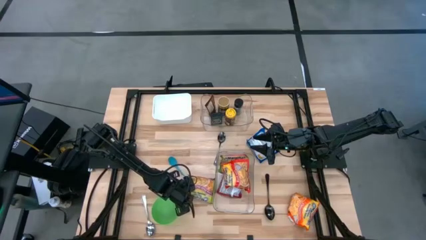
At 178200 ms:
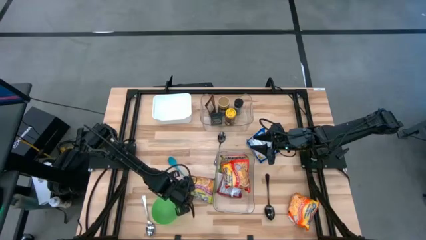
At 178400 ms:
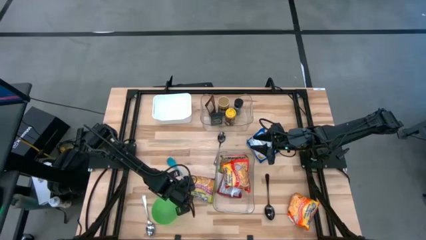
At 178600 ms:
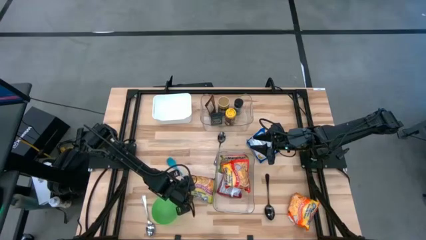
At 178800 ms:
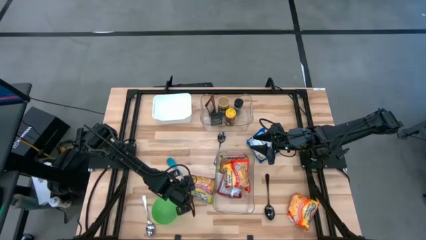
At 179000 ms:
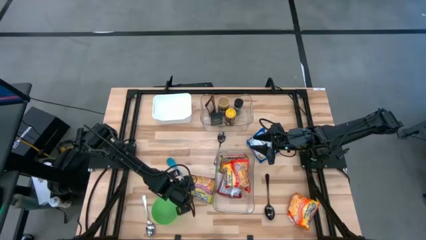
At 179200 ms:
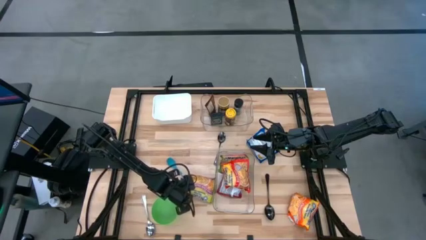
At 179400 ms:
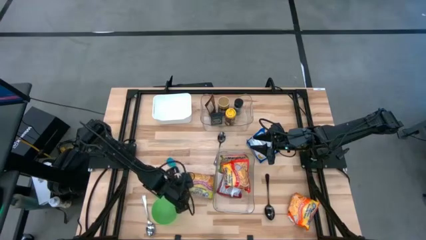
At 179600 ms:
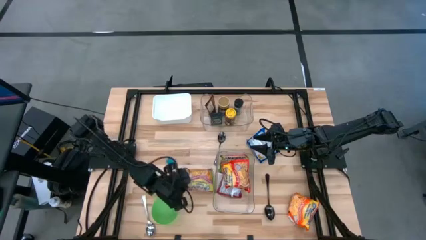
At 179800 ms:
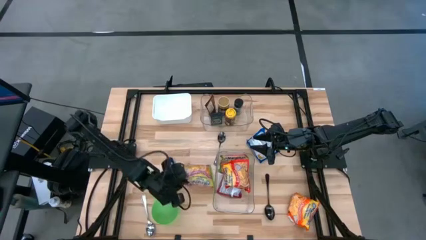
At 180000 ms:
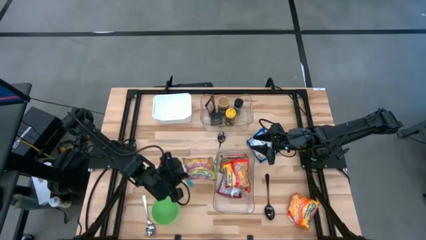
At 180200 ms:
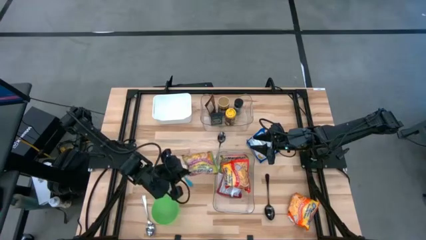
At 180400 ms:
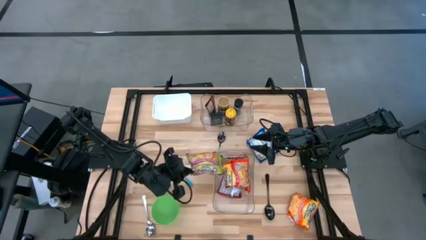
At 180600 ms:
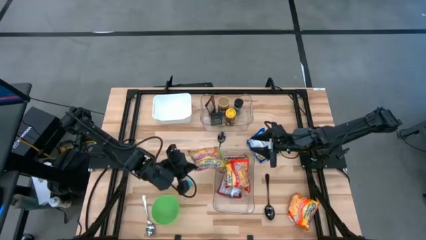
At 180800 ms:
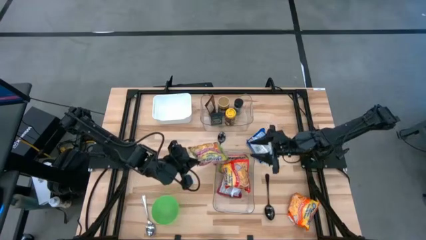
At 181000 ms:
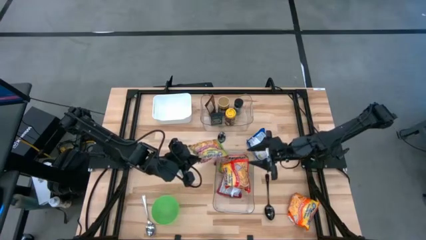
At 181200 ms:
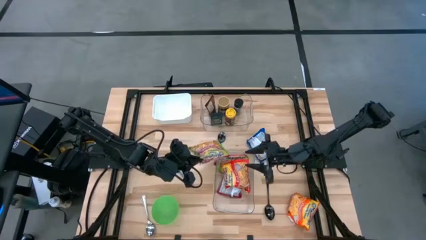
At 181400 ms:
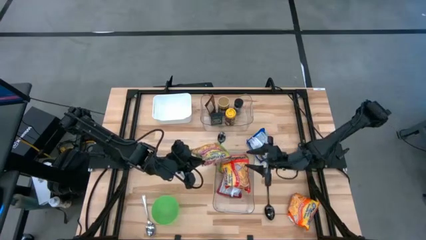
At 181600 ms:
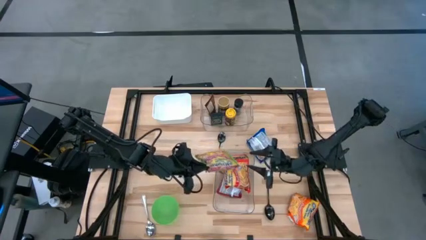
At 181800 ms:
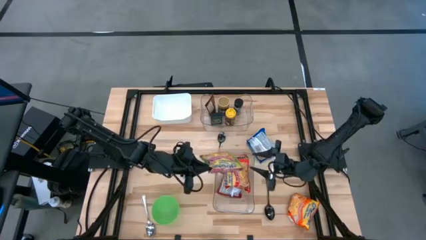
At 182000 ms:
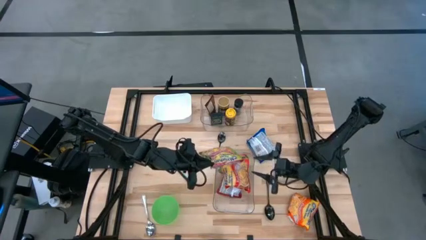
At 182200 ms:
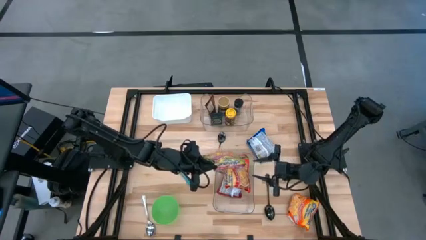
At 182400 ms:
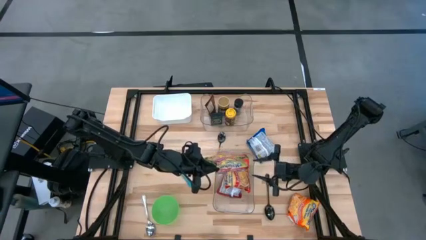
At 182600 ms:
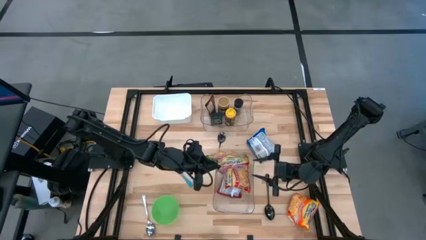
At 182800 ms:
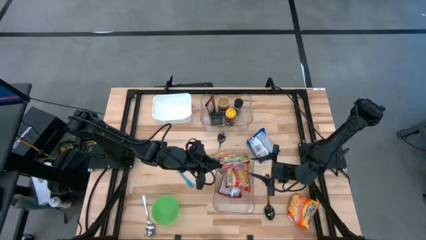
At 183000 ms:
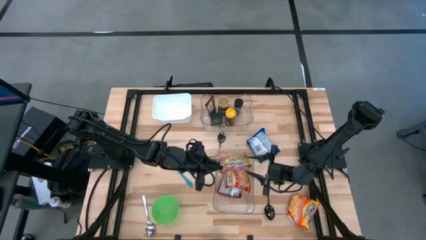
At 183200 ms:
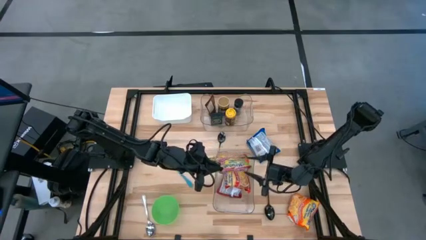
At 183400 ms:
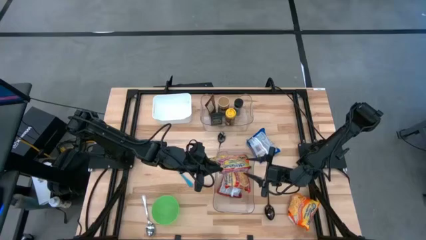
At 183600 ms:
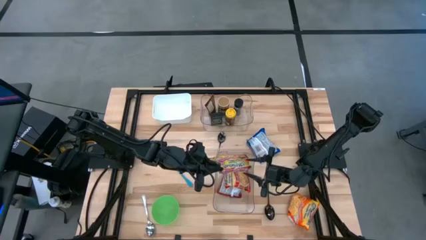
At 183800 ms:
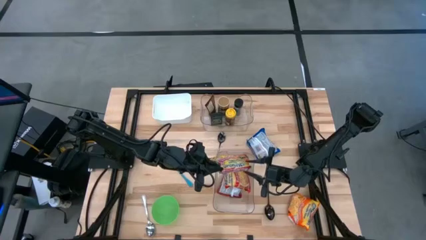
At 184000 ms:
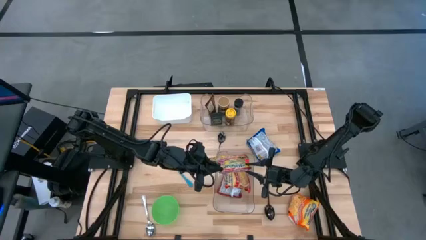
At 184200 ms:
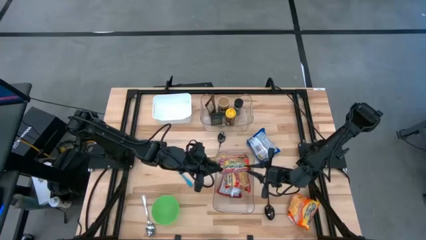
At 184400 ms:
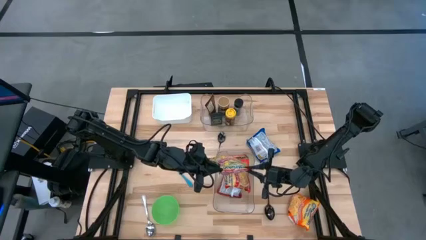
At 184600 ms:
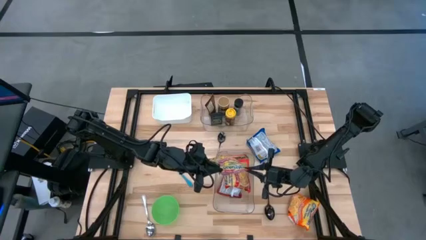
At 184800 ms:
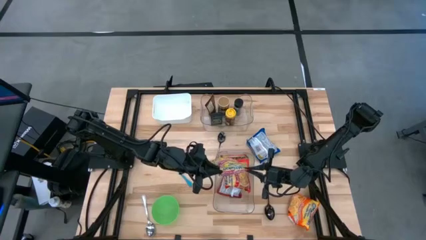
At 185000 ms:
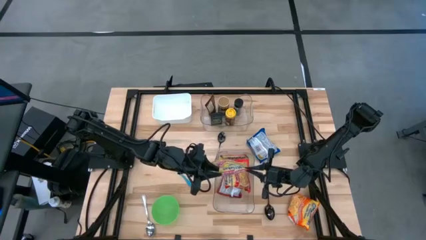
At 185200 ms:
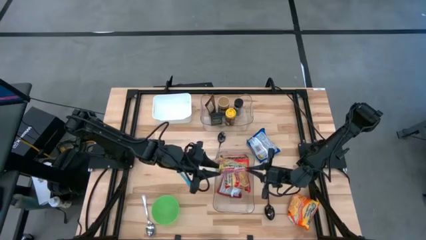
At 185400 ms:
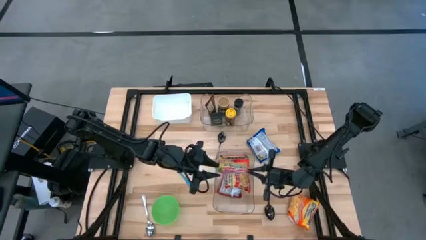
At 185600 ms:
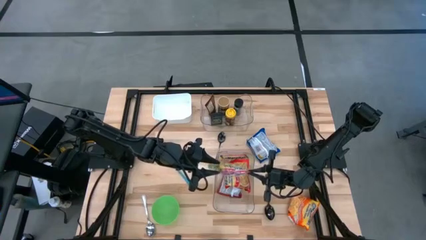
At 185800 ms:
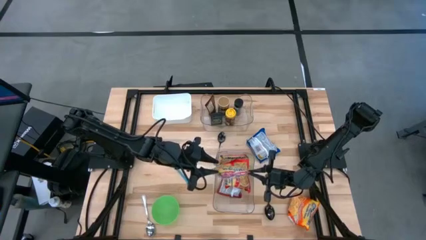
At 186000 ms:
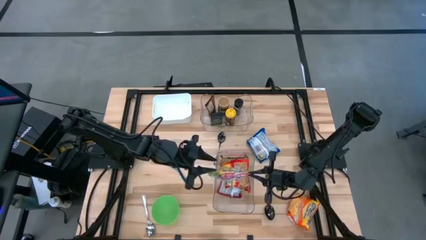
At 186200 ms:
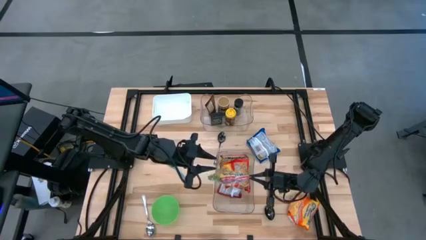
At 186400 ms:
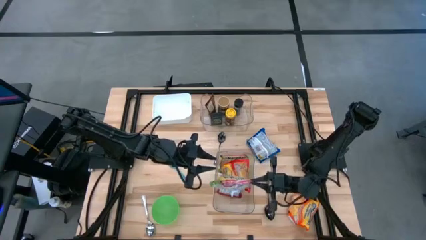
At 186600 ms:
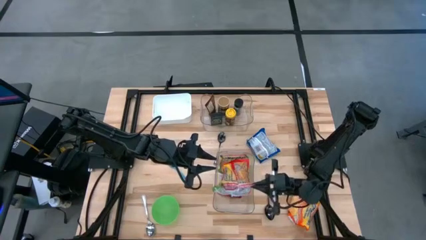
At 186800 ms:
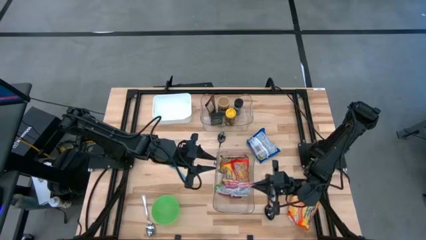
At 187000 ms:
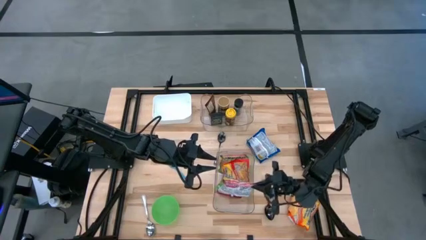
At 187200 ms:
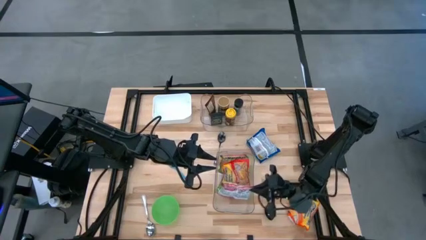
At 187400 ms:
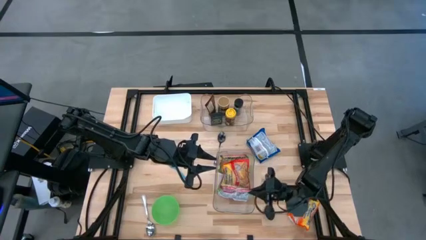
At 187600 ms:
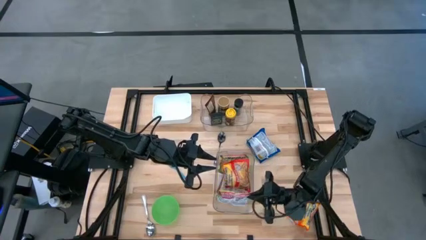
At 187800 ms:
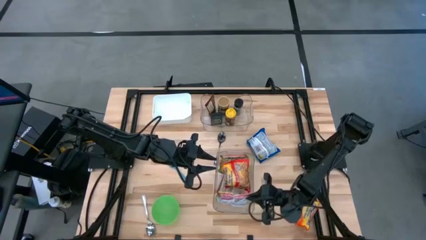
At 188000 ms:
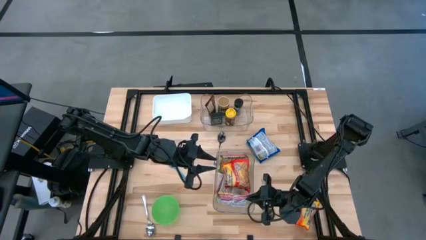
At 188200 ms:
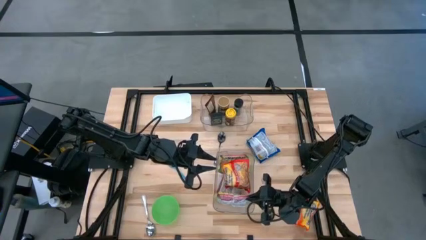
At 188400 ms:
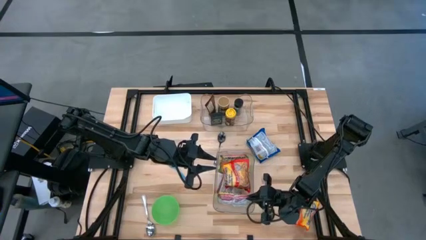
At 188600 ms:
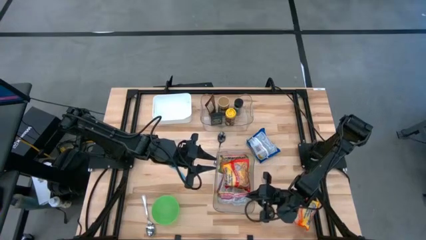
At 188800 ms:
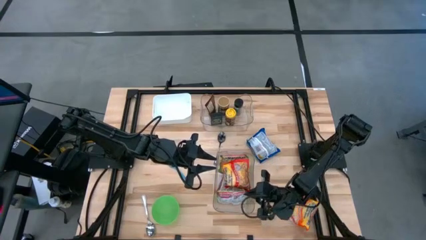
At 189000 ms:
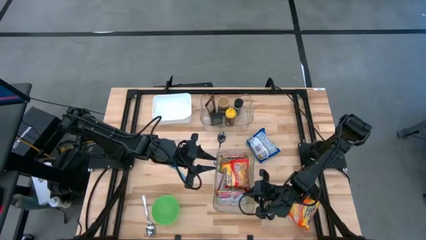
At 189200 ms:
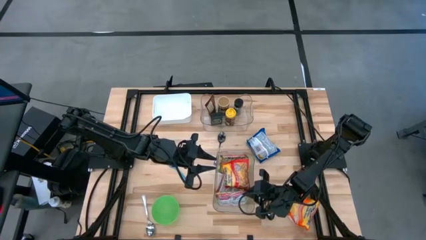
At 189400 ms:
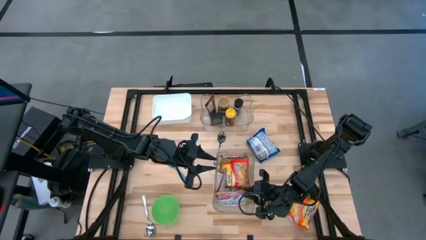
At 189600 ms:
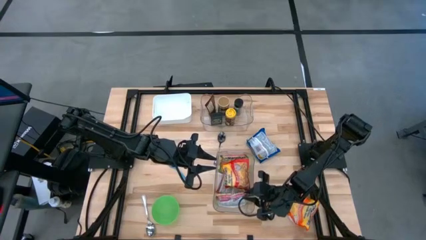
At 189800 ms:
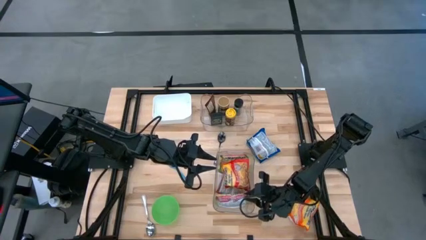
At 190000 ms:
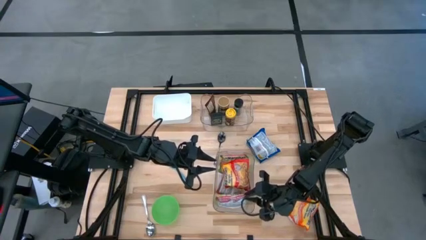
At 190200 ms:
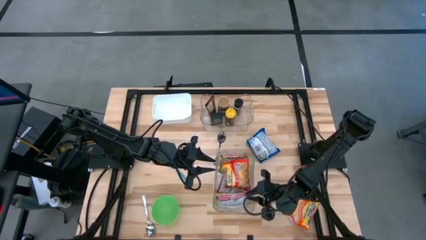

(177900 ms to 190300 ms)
Task: Pick & Place Food Item
Put the green noodle pack into the bottom transparent bin
